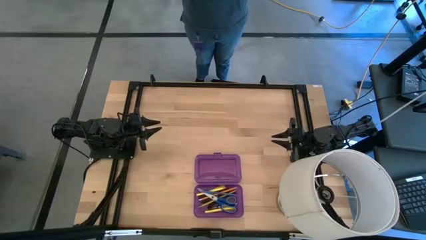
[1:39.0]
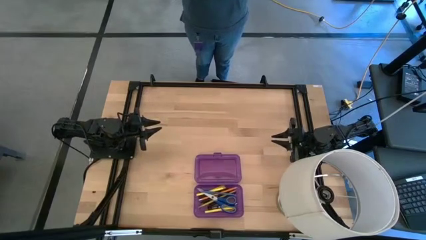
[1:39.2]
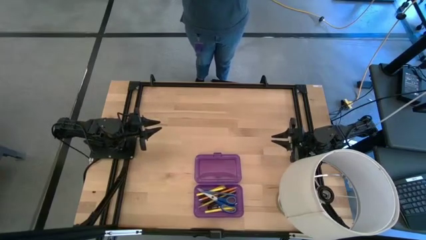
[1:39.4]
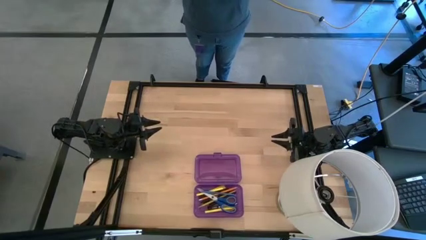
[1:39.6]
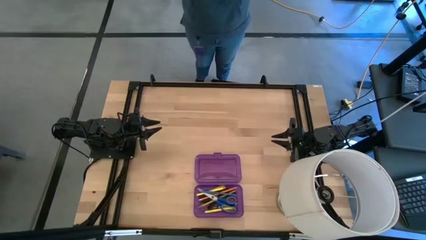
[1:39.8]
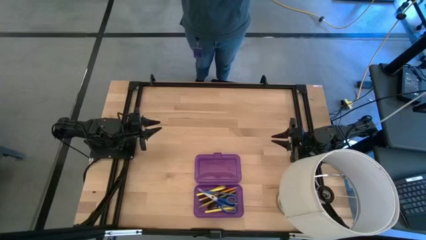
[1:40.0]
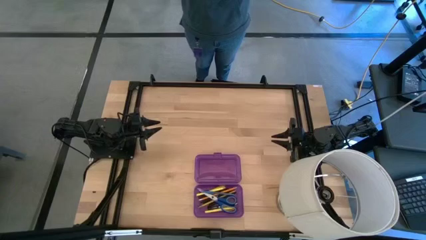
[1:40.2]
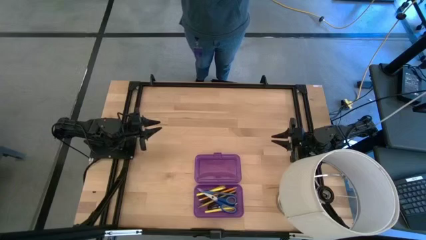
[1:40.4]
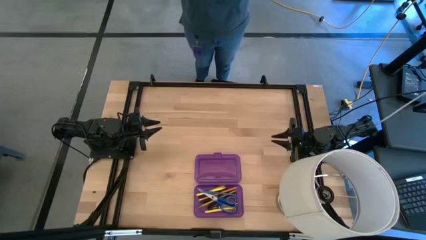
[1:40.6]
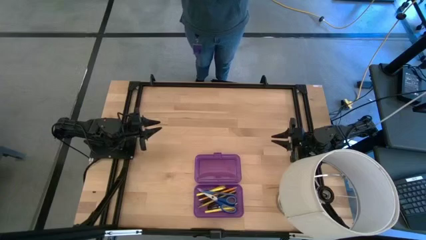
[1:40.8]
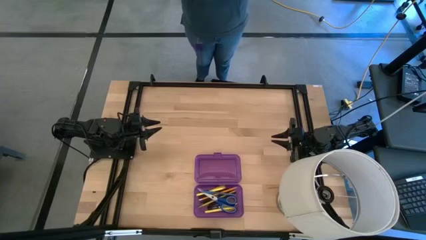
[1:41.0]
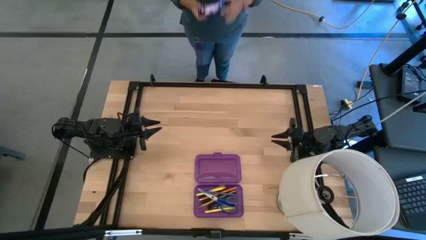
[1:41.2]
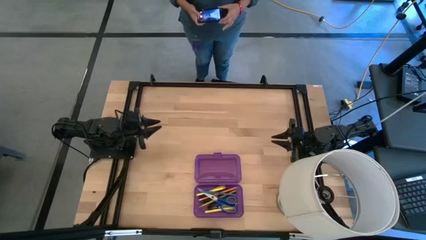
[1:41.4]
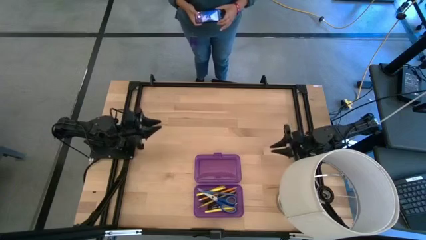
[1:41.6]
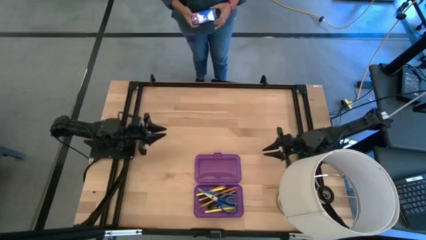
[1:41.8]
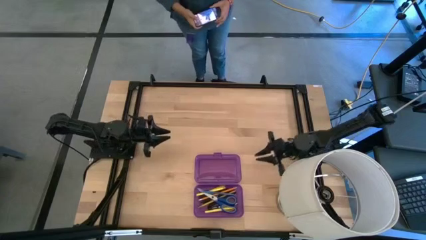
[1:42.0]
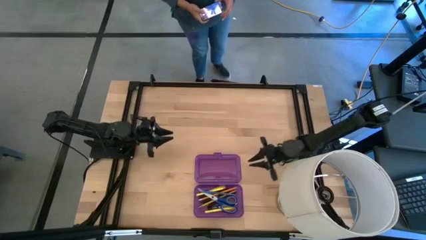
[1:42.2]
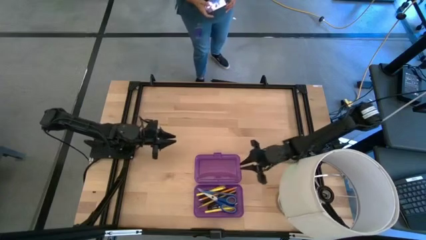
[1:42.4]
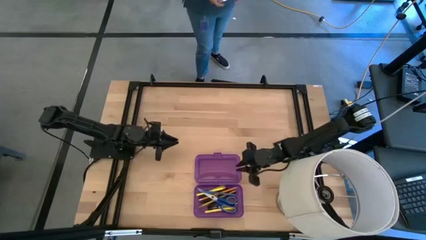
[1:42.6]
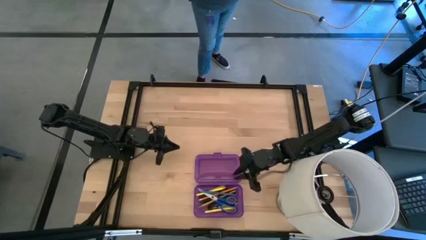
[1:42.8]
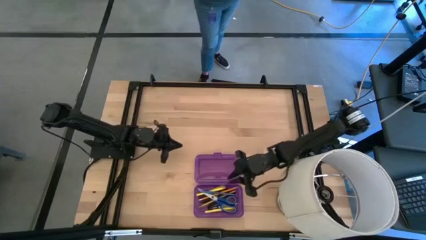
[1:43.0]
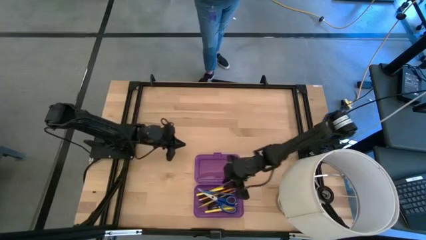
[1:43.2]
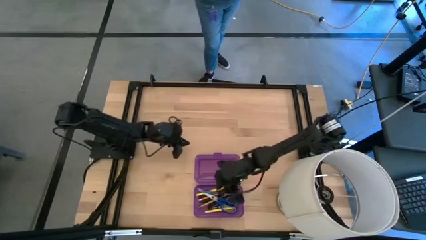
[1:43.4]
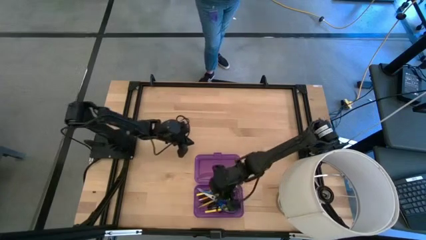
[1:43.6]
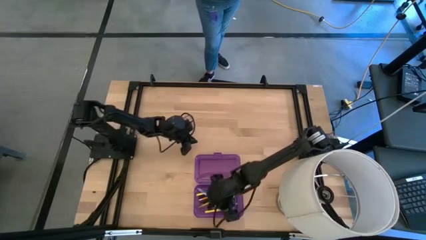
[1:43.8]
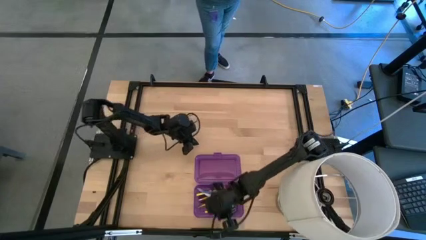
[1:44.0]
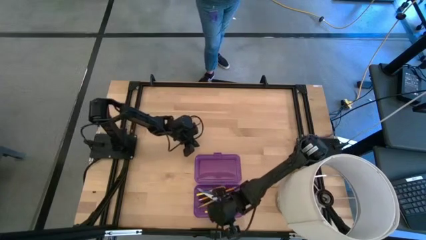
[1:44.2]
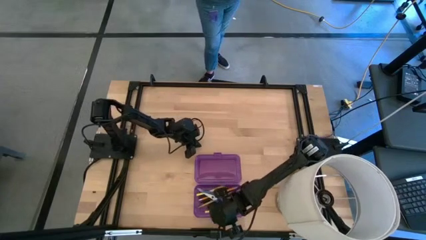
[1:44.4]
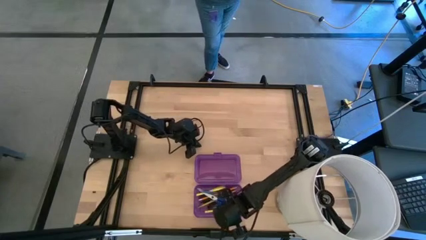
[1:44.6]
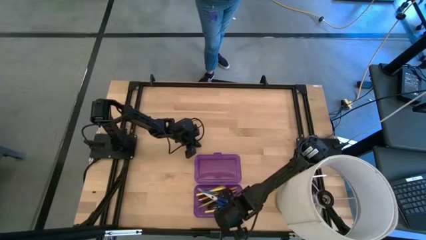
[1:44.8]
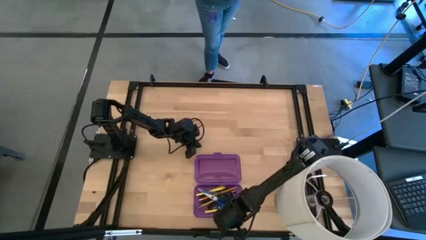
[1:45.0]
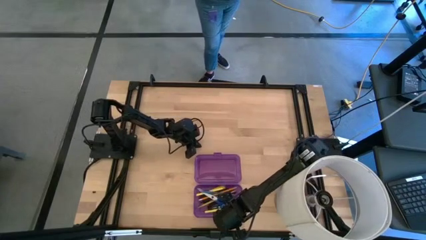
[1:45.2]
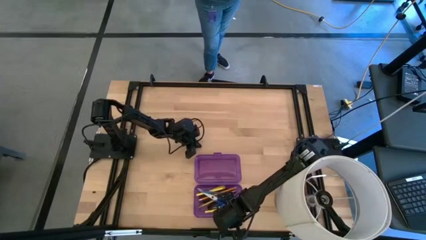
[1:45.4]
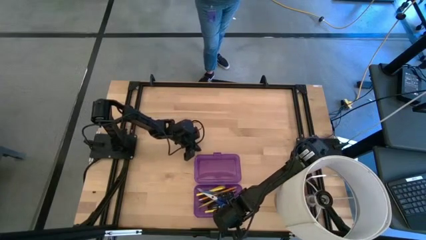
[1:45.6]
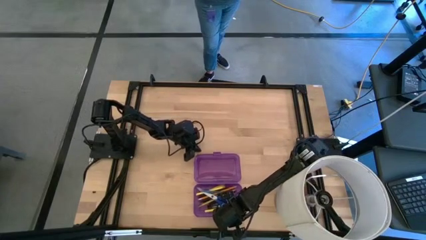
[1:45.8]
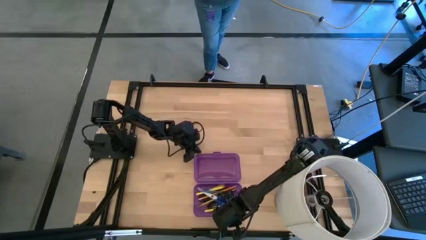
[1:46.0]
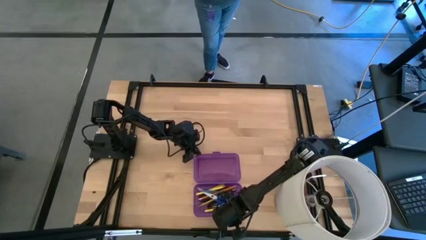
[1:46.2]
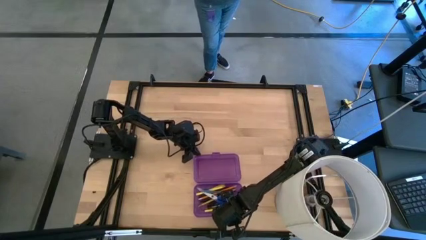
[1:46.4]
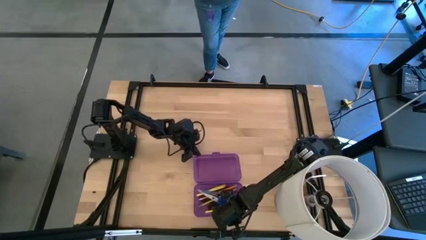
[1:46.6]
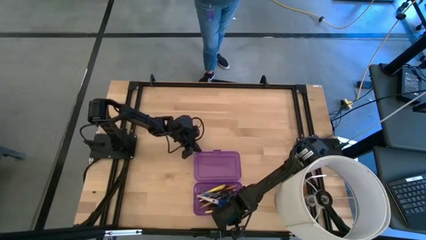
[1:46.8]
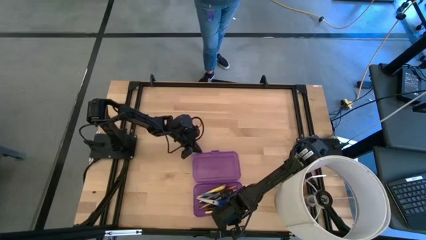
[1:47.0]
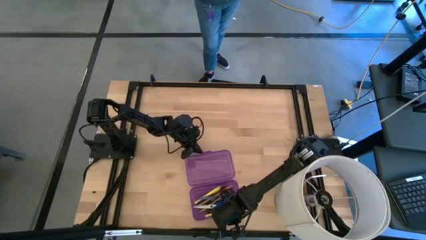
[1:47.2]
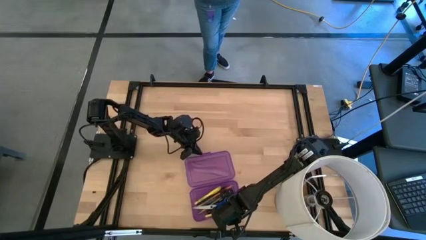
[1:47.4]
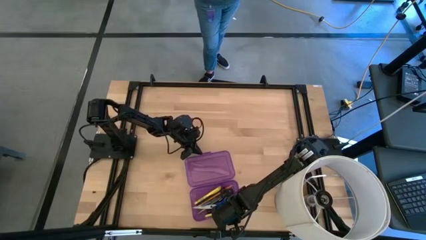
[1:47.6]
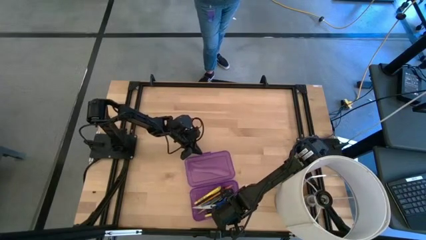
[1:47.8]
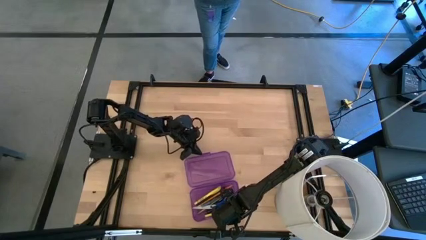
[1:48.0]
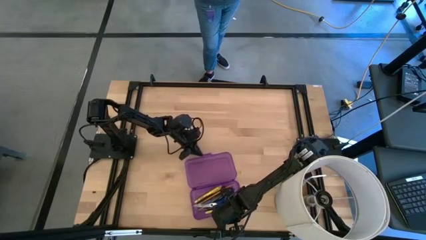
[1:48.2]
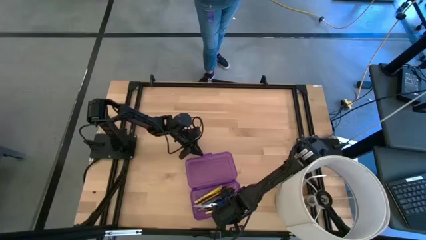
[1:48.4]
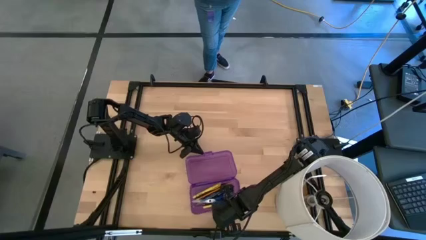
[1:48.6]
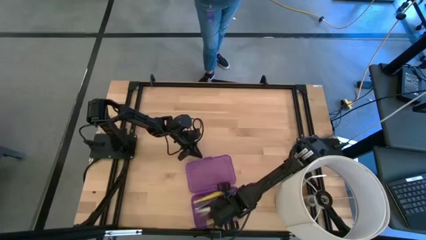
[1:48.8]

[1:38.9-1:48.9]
Task: Pick & place school supplies into a supply box
Close the violet supply box

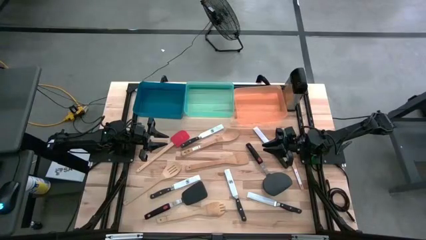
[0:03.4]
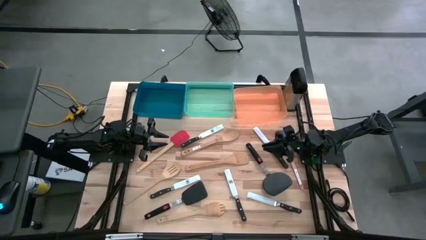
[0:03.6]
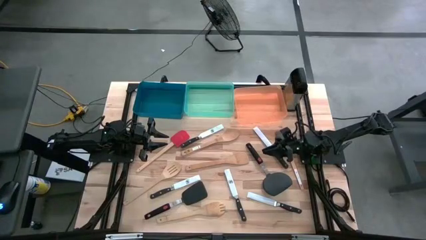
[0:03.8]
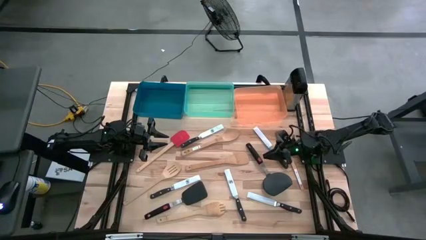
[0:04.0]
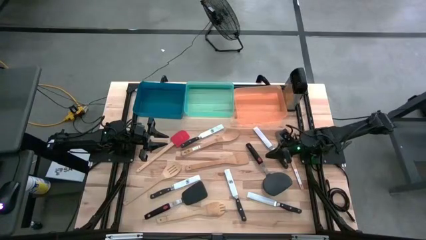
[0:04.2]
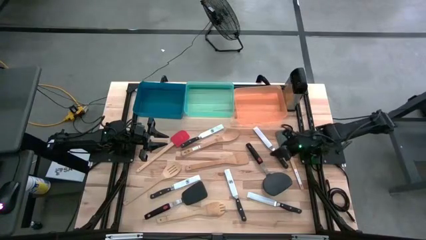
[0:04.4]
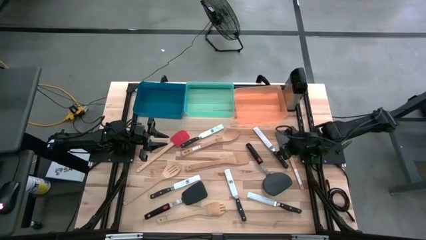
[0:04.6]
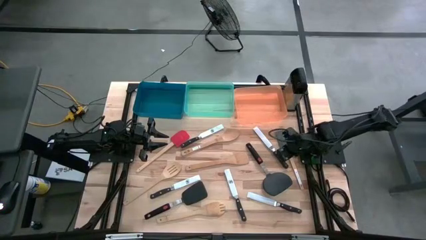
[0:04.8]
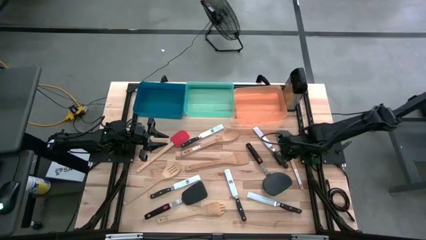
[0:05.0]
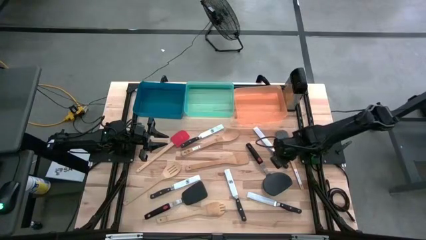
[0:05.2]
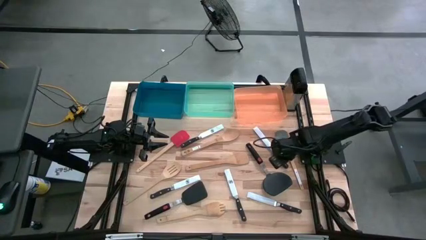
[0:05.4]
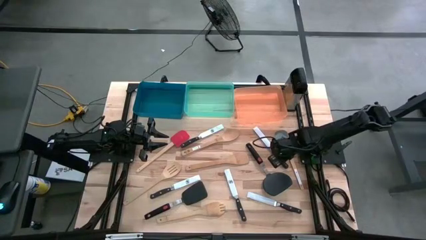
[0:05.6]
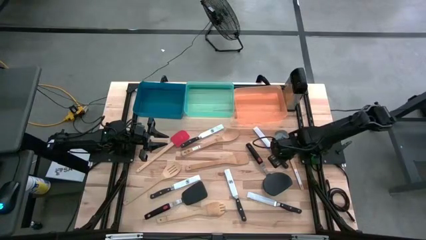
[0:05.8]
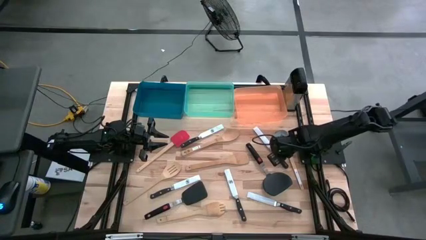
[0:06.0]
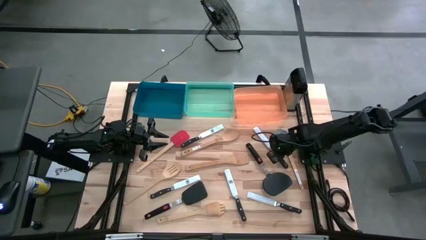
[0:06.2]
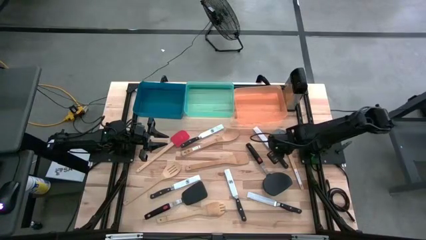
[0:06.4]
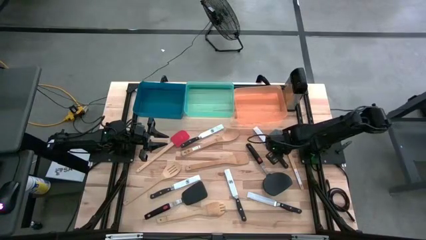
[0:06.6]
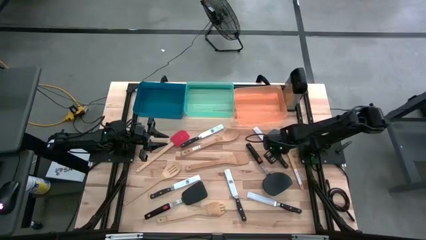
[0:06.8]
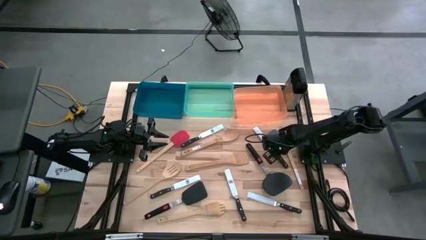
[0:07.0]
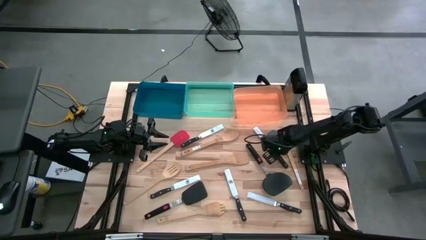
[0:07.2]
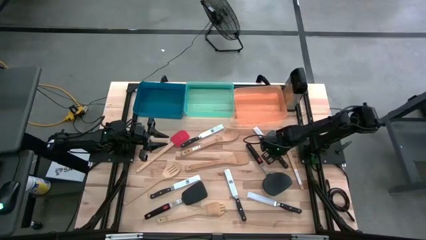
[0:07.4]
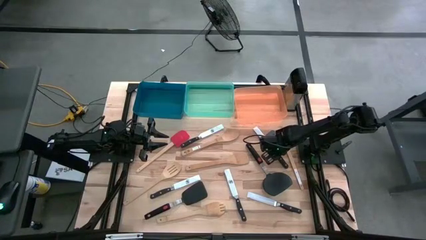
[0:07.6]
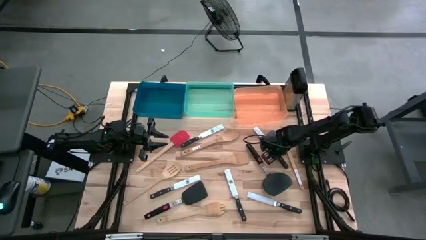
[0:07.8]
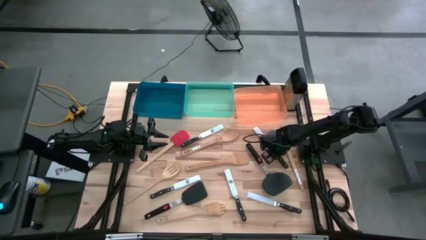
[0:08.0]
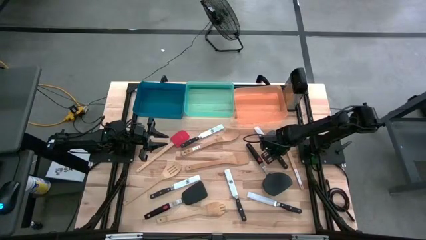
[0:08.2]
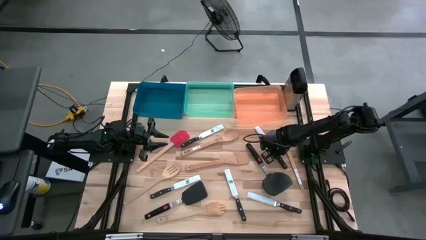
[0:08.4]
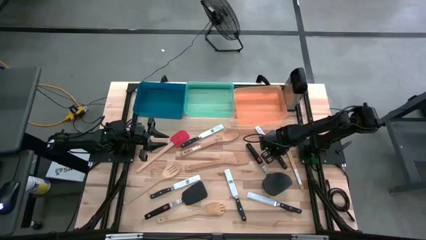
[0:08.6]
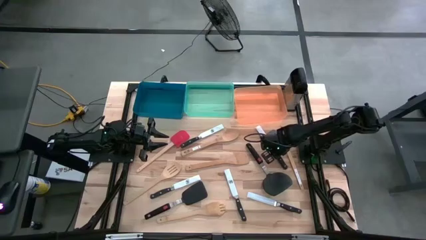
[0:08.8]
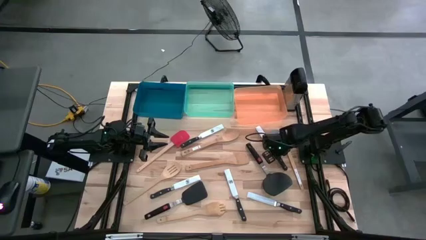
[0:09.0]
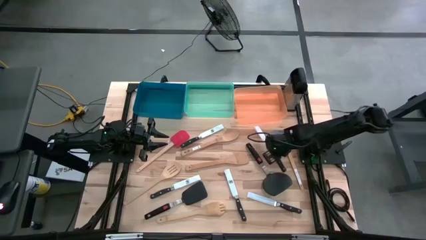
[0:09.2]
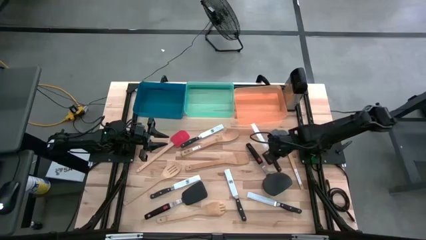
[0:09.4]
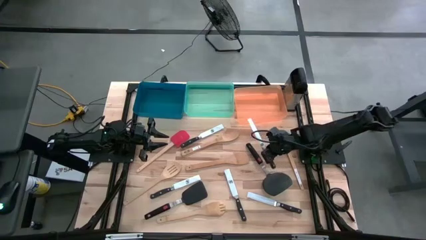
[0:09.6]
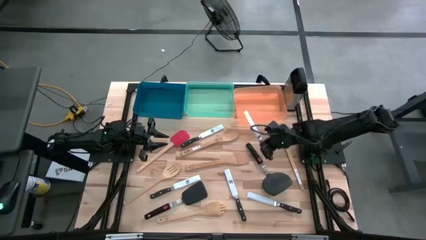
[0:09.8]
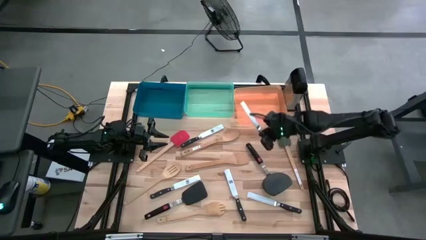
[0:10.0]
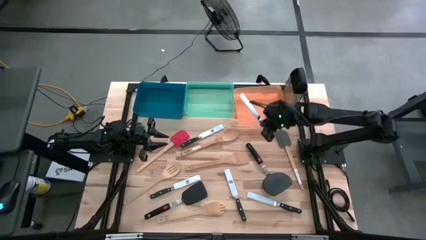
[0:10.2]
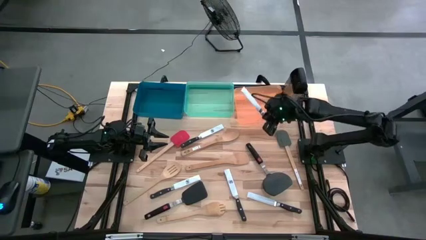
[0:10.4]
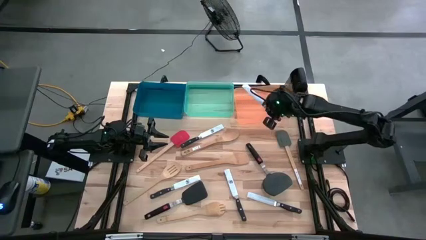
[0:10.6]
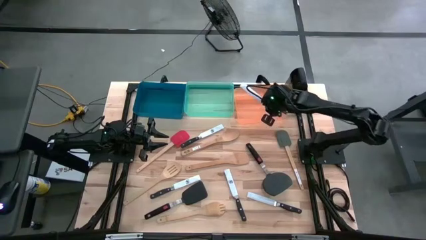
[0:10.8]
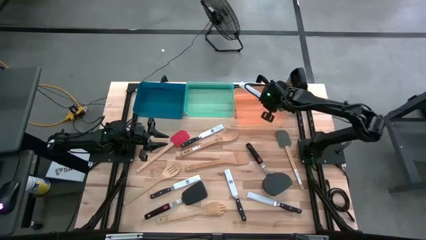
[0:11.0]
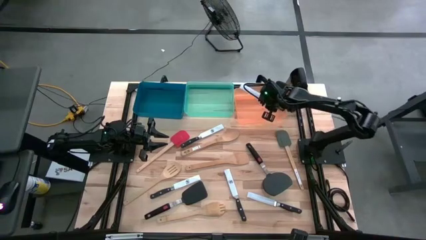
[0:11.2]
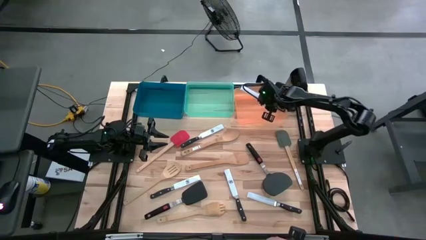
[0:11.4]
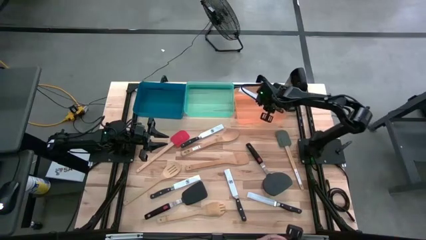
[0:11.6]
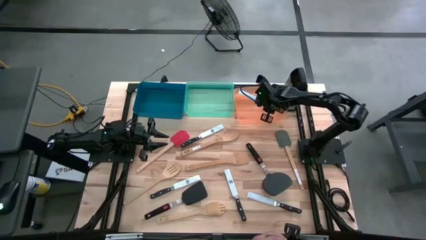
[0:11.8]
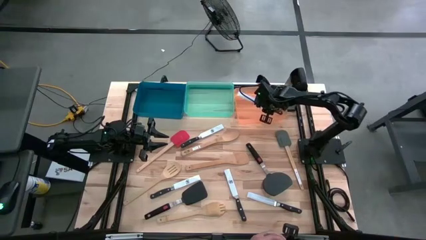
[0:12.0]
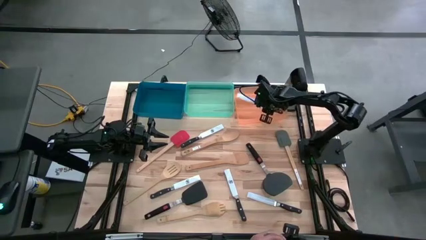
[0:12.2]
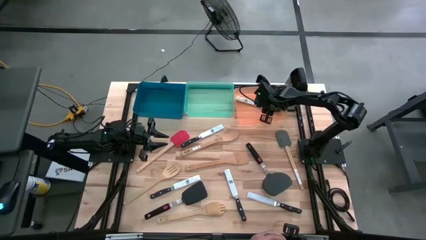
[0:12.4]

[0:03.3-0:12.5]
Task: Pick & Place Kitchen Items
Put the knife into the orange bin
